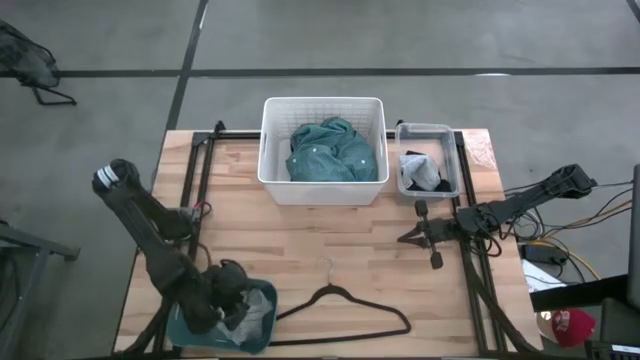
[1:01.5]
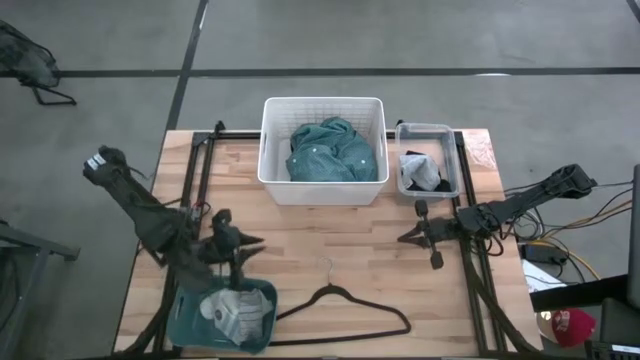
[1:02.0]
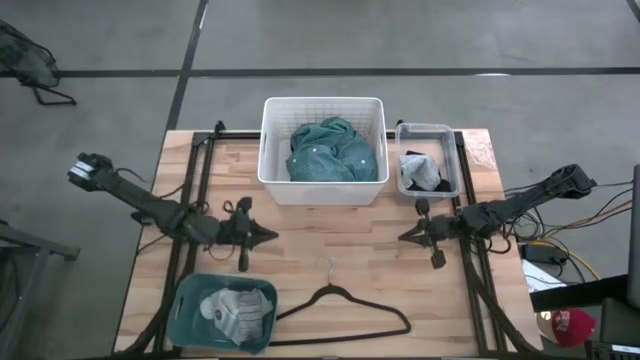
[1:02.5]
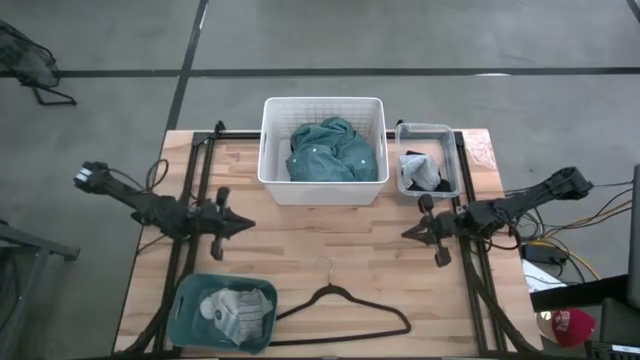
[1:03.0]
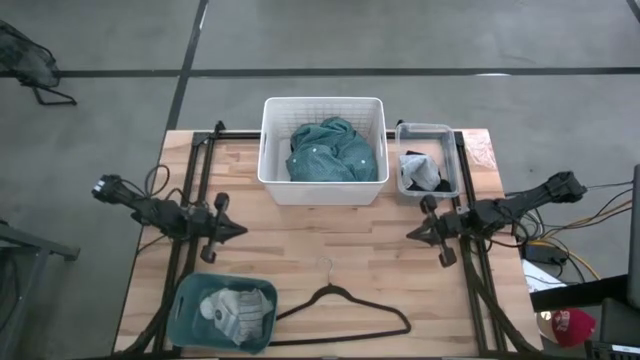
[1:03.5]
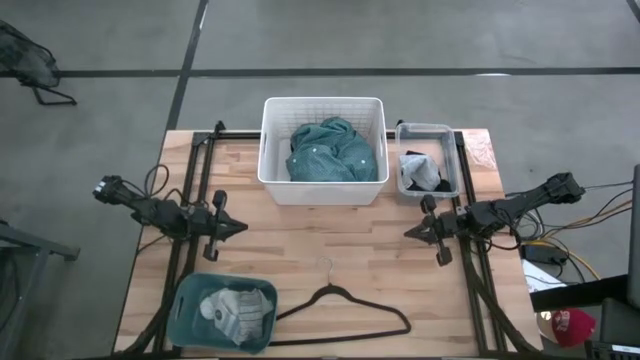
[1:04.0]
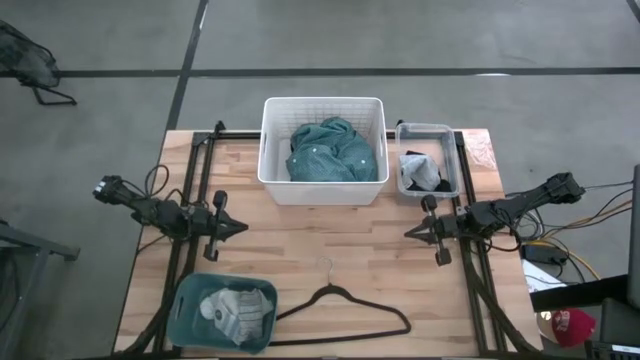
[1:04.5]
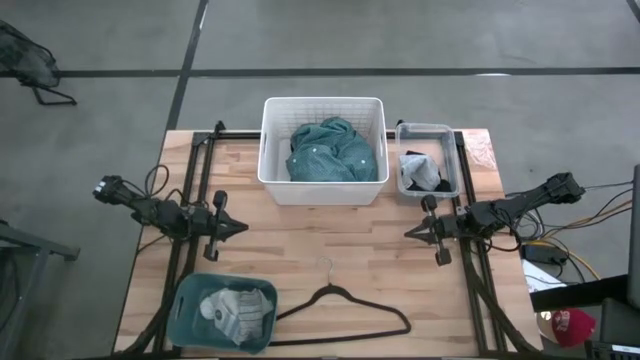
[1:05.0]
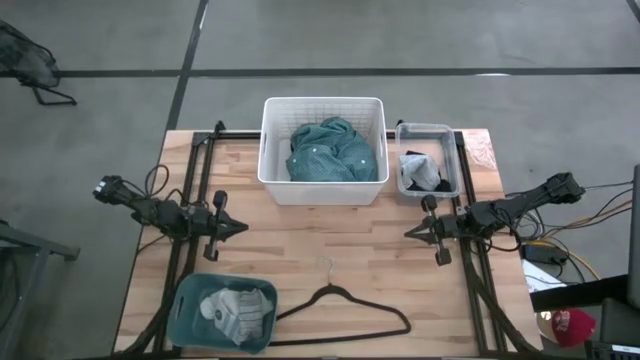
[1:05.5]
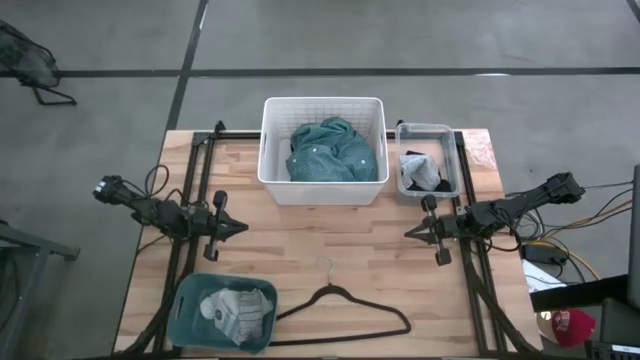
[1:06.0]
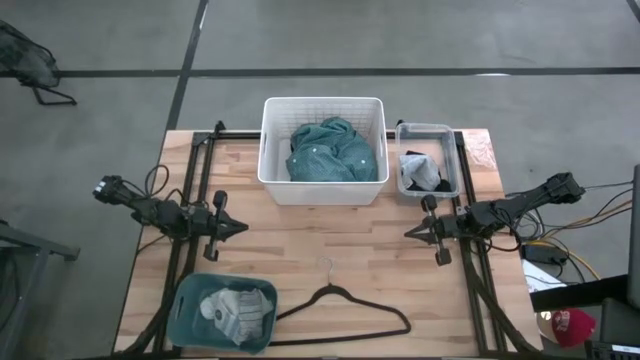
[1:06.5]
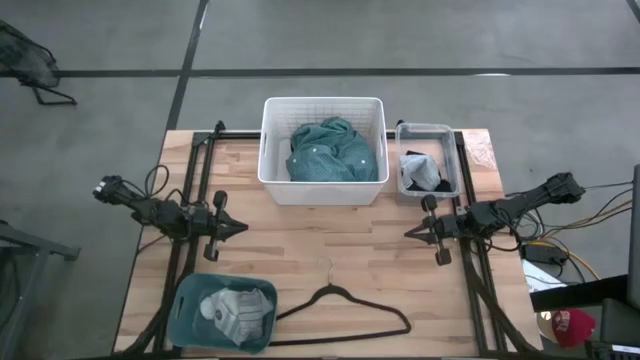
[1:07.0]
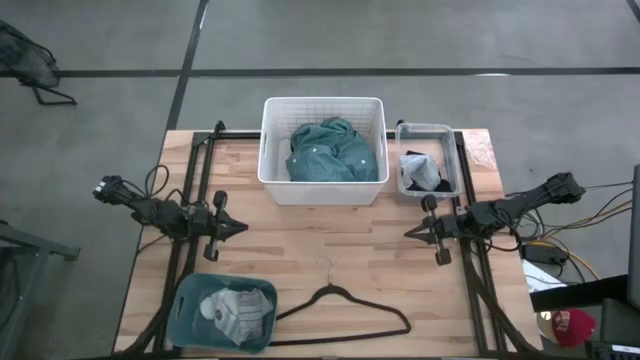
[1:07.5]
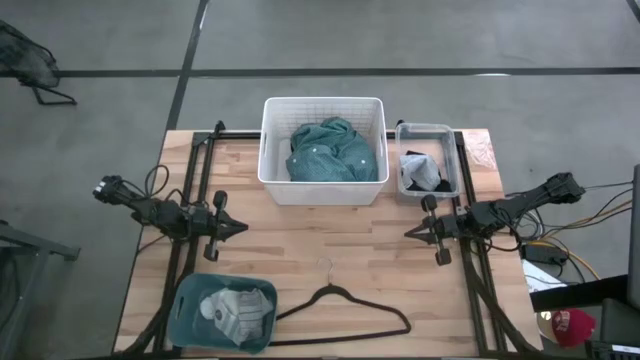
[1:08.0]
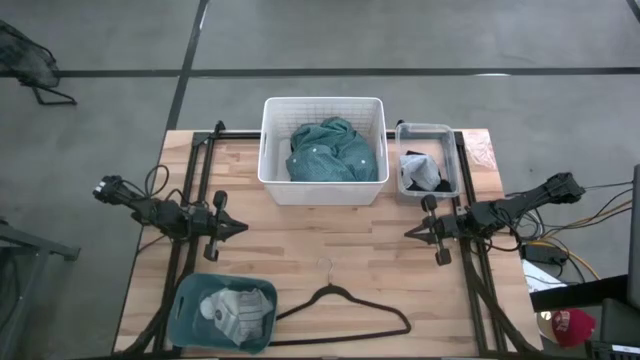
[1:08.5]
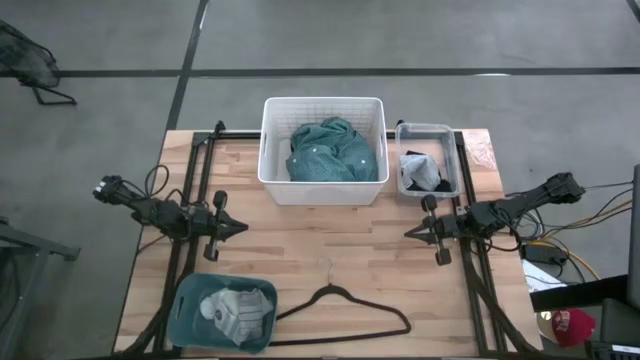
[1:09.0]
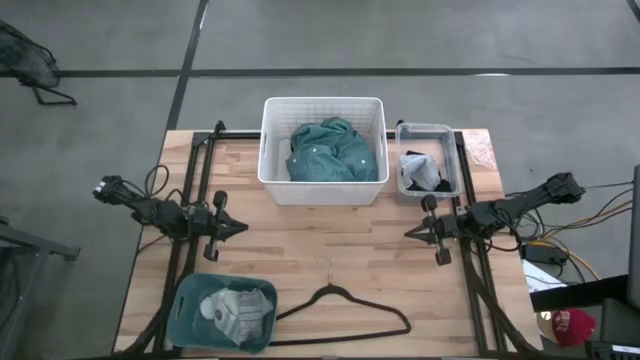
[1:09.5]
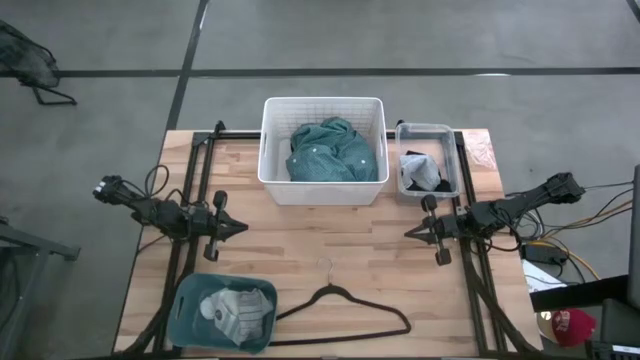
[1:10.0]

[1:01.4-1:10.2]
Task: Pick & Place Cloths
Return to Home Position

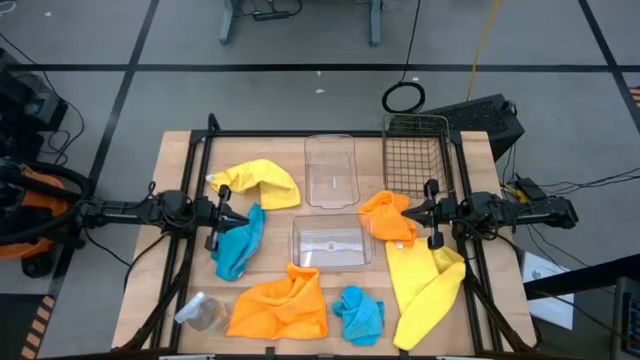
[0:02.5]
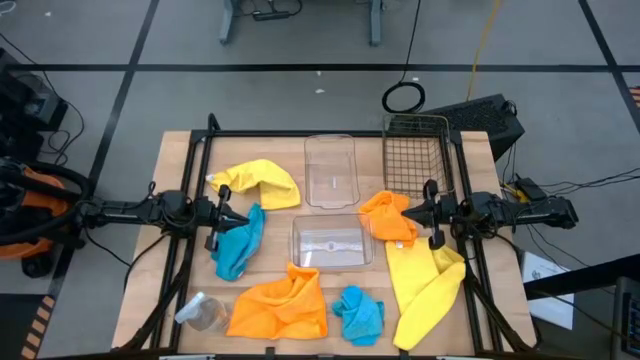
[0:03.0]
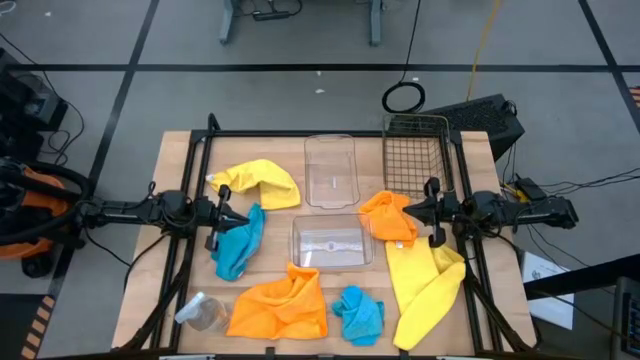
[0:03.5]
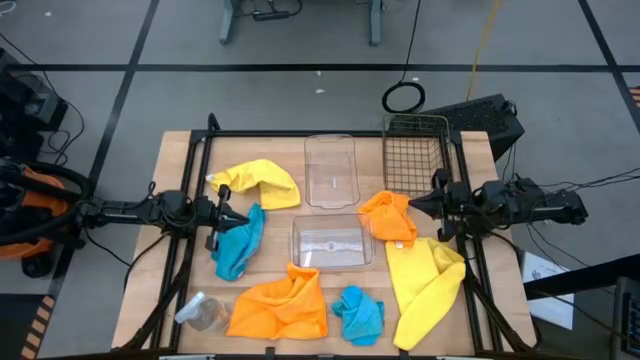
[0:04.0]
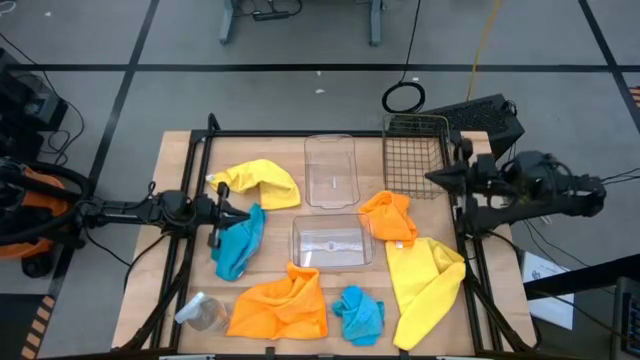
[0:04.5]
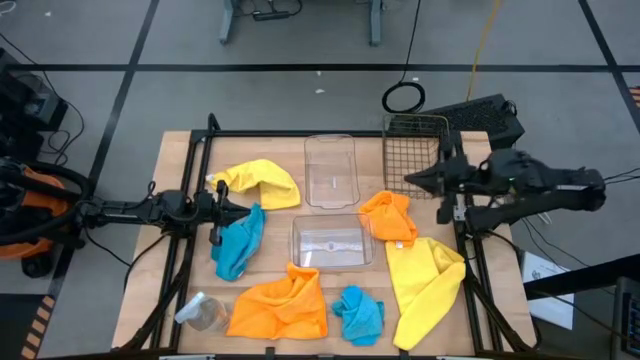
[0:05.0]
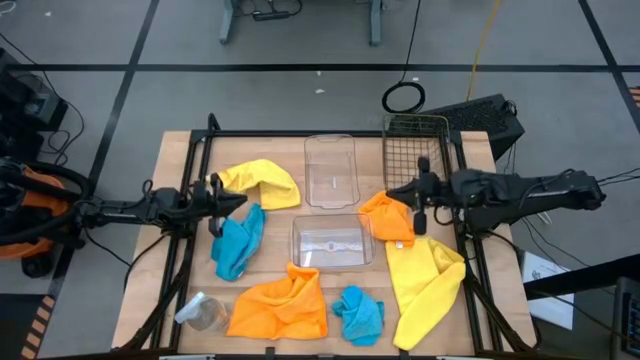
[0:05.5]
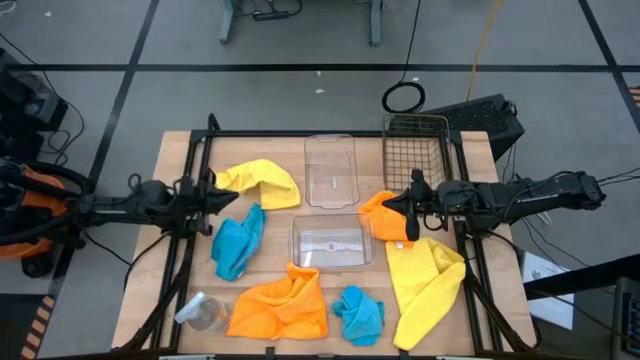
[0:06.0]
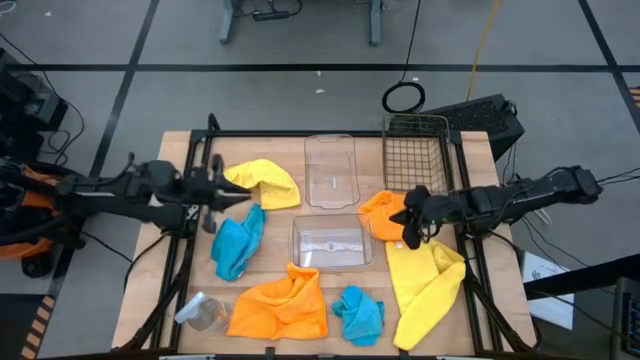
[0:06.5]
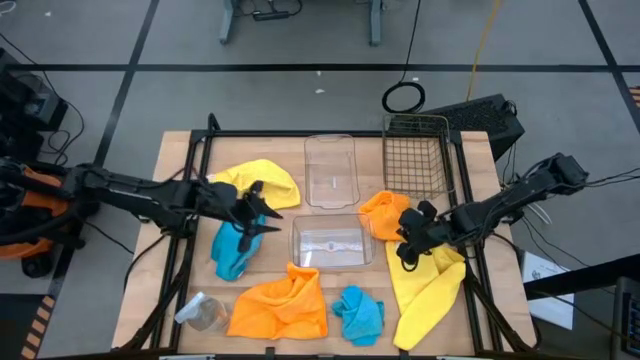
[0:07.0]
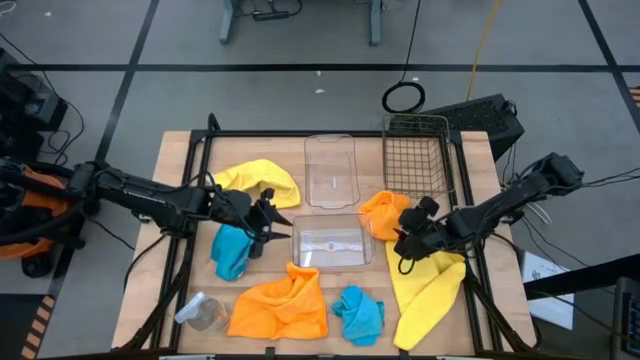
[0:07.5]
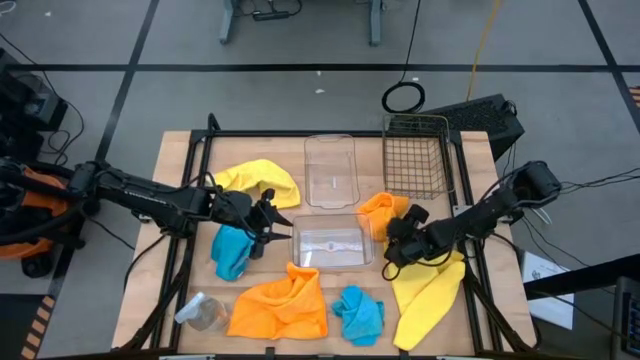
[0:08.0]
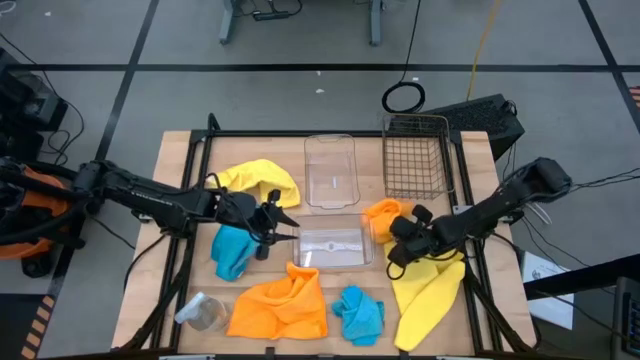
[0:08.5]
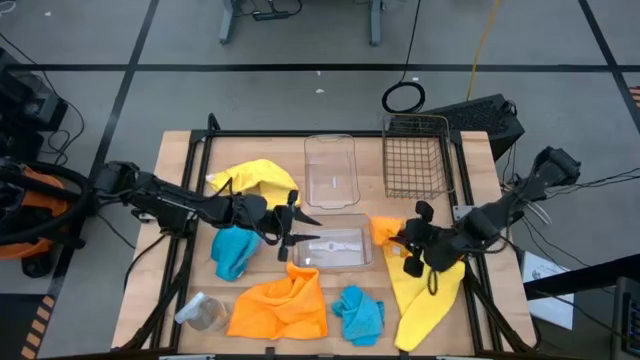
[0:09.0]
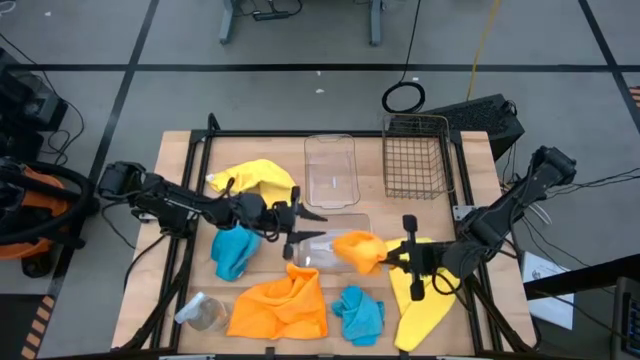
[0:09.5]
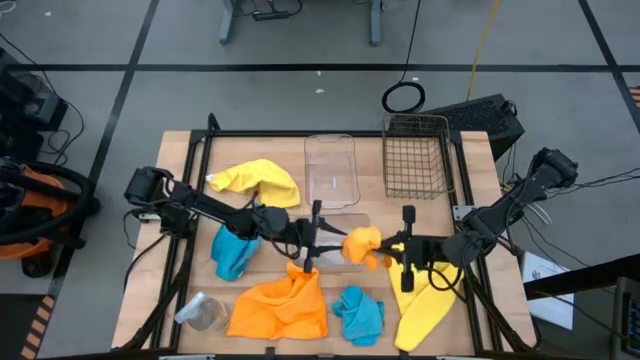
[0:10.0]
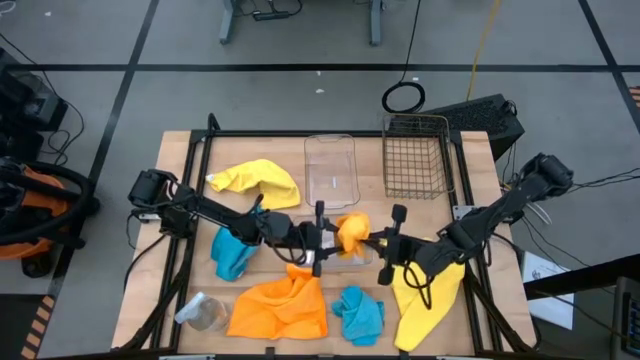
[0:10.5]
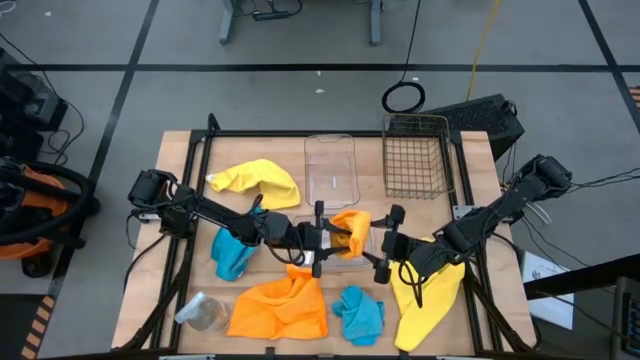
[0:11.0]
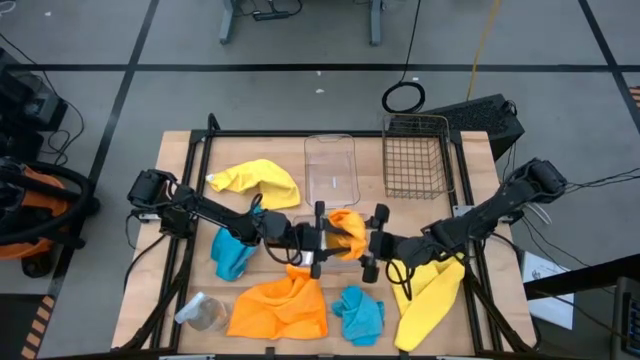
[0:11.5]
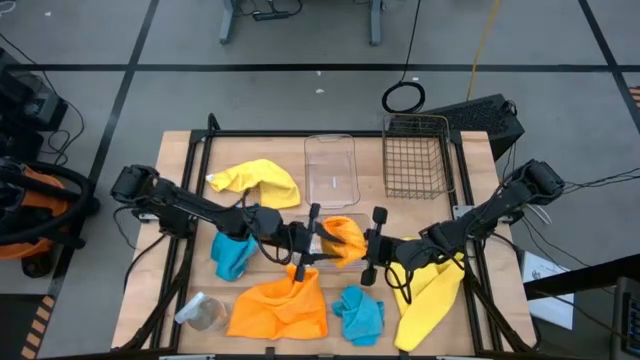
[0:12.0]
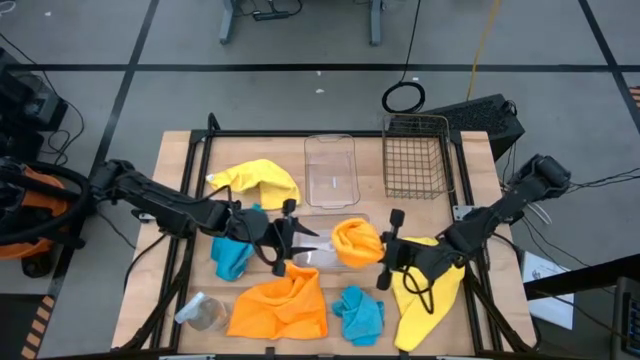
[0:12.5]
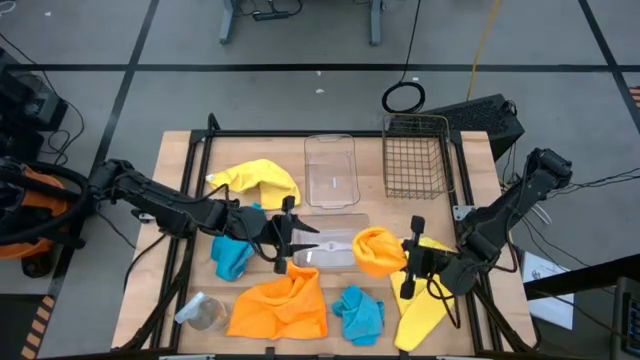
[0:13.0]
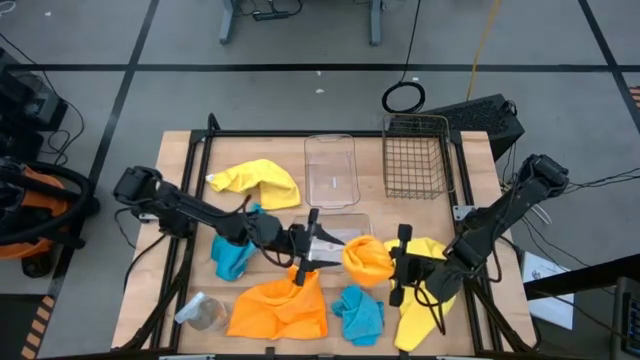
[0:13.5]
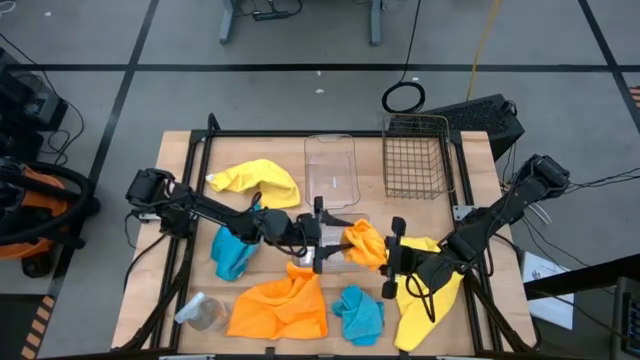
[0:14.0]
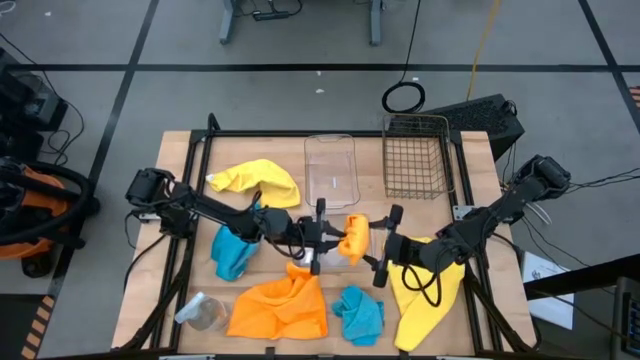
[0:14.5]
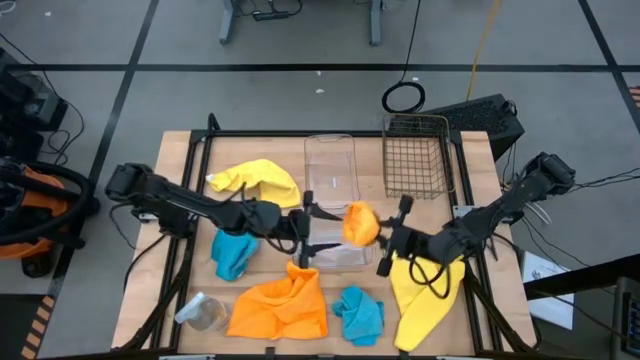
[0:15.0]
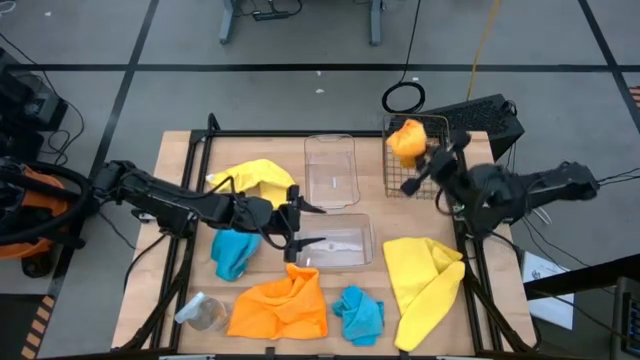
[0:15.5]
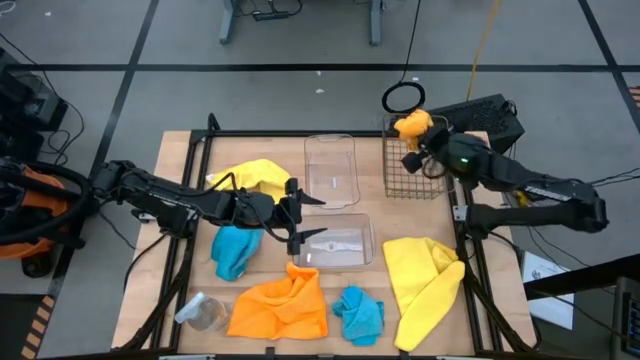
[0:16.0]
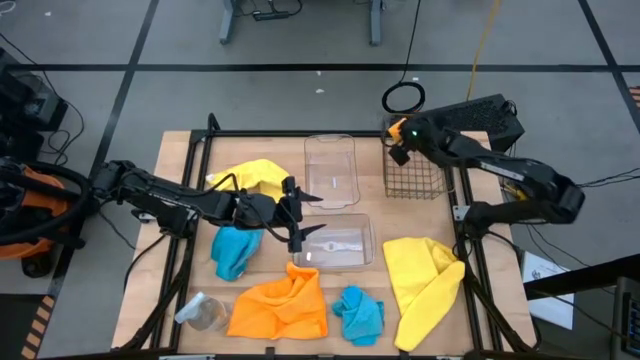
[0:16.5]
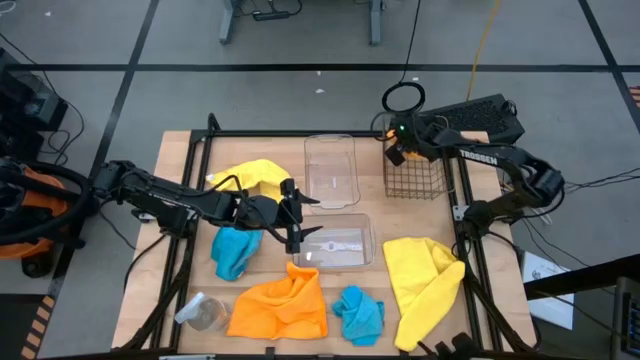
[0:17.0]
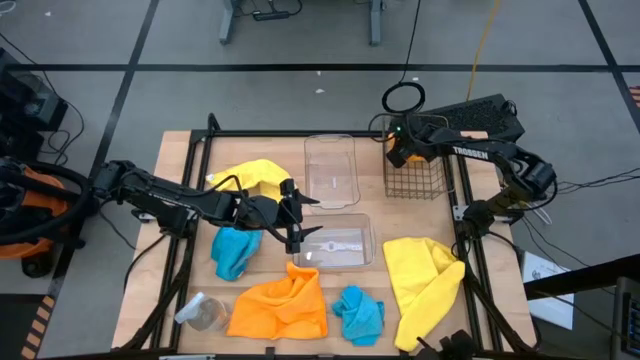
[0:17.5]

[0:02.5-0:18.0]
Task: Sort microfiber towel by color & place in baskets
Put the top orange microfiber towel into the black metal basket
